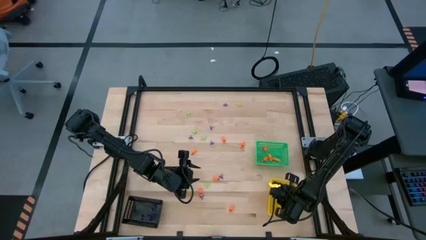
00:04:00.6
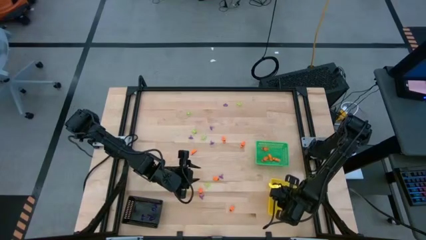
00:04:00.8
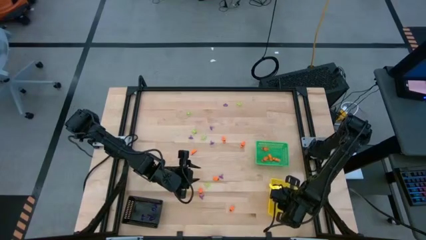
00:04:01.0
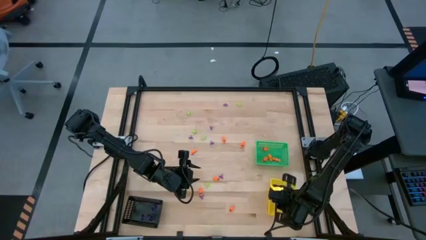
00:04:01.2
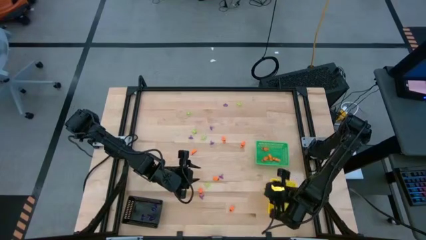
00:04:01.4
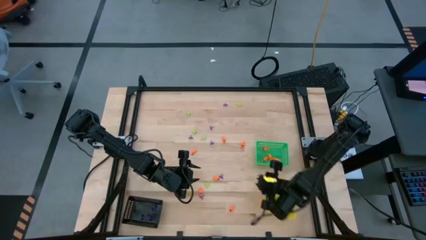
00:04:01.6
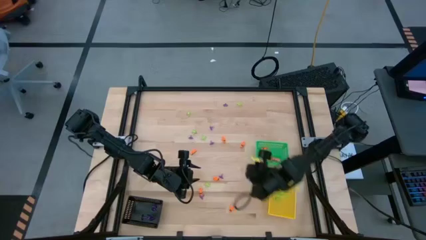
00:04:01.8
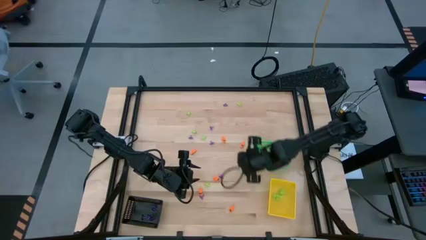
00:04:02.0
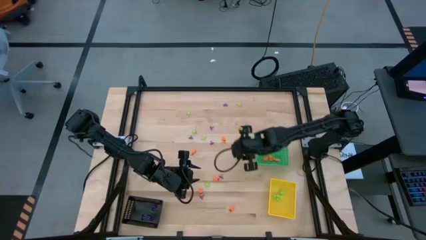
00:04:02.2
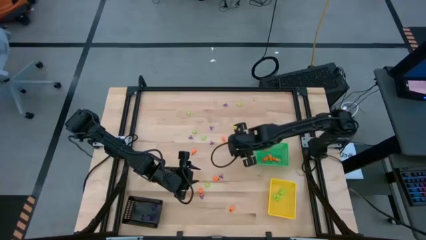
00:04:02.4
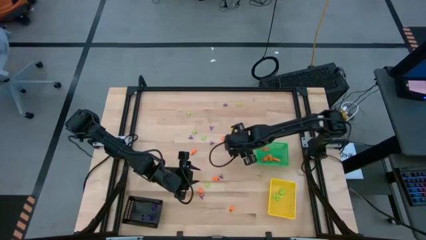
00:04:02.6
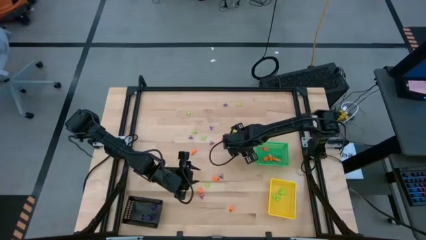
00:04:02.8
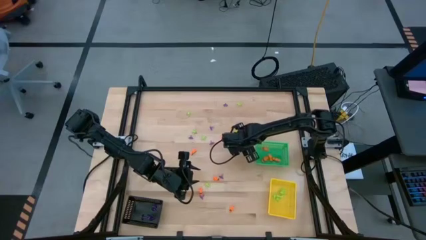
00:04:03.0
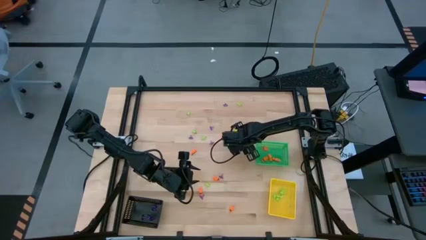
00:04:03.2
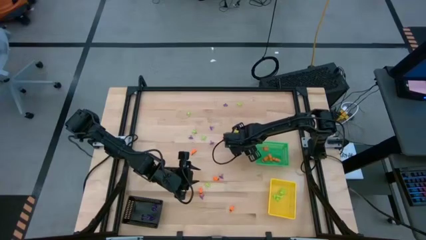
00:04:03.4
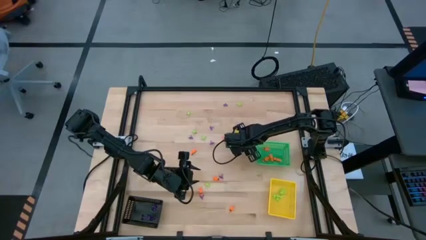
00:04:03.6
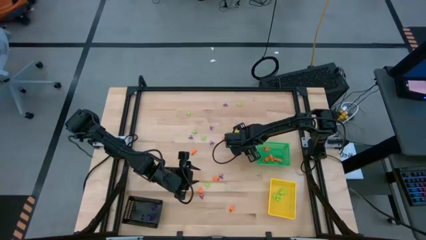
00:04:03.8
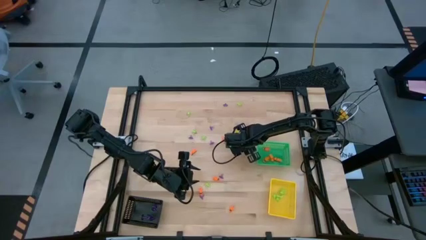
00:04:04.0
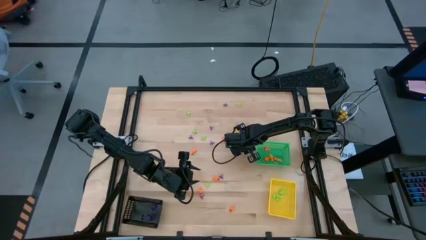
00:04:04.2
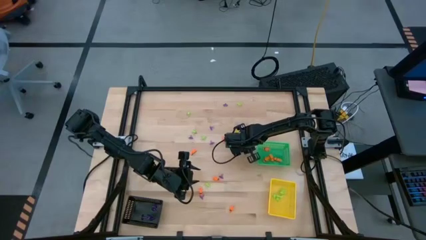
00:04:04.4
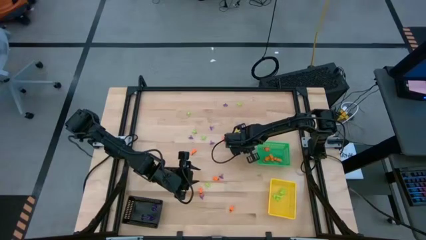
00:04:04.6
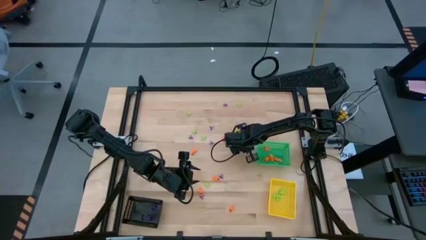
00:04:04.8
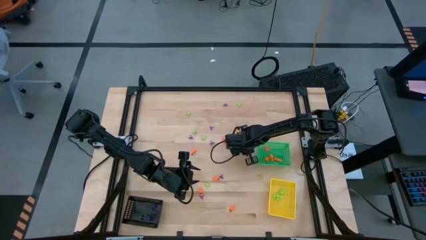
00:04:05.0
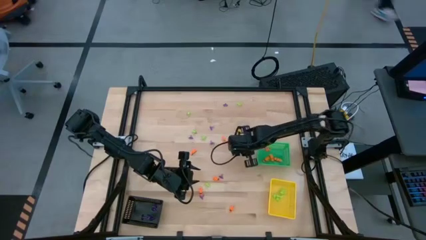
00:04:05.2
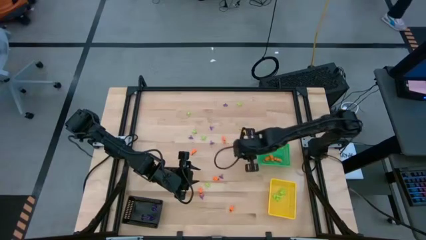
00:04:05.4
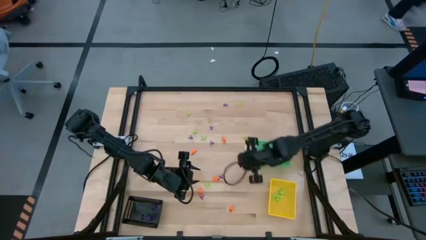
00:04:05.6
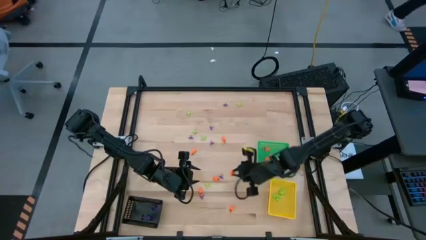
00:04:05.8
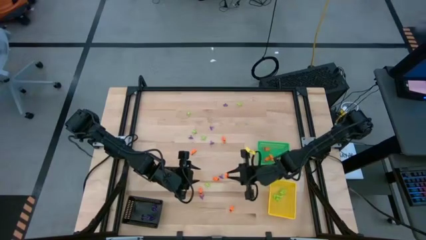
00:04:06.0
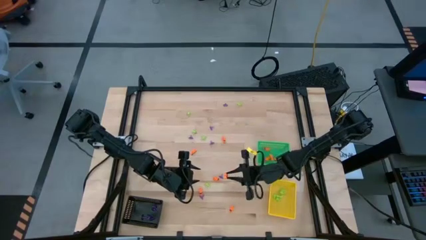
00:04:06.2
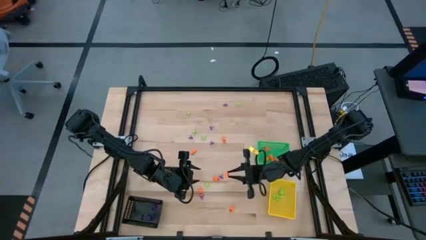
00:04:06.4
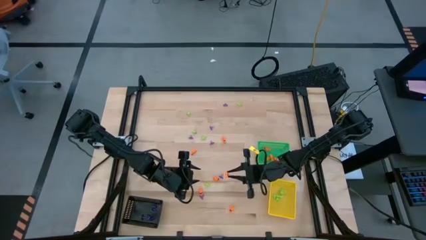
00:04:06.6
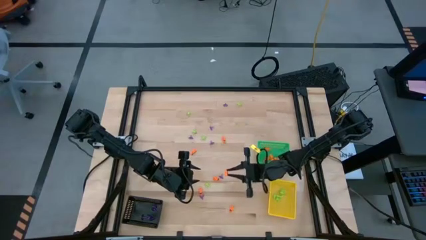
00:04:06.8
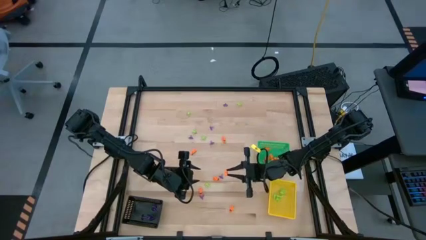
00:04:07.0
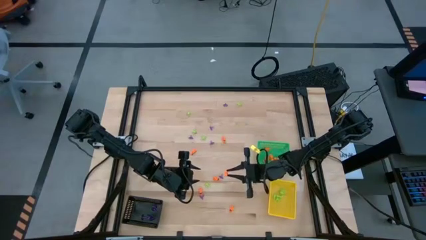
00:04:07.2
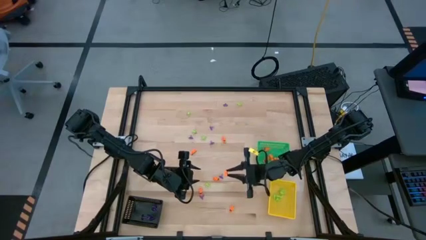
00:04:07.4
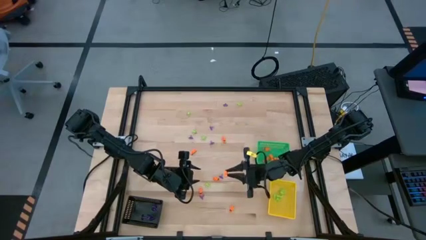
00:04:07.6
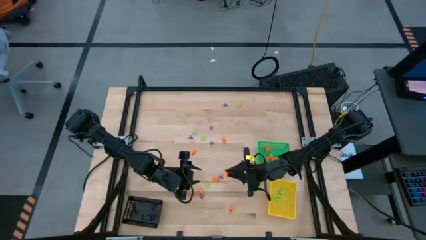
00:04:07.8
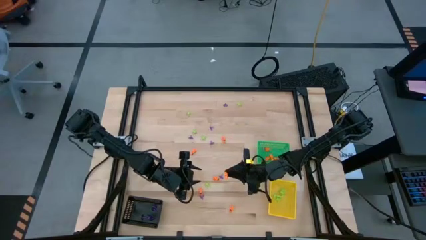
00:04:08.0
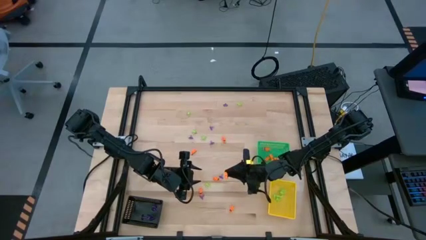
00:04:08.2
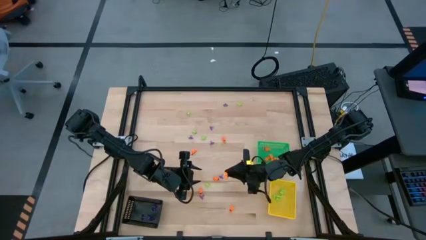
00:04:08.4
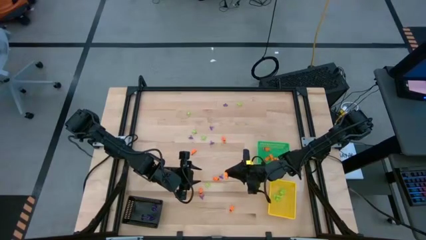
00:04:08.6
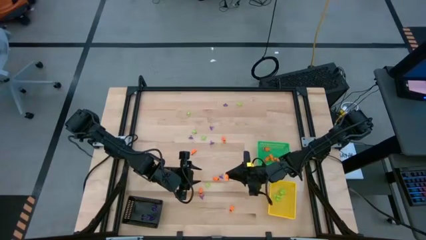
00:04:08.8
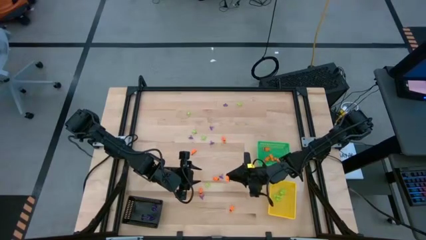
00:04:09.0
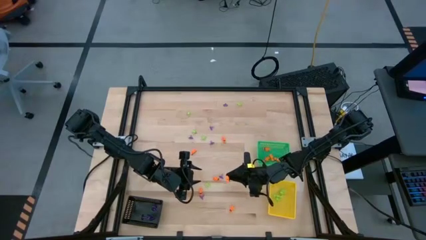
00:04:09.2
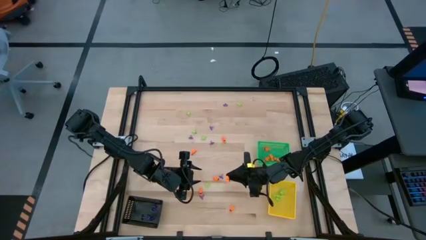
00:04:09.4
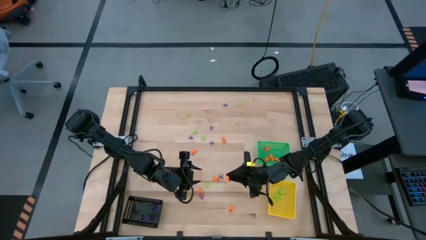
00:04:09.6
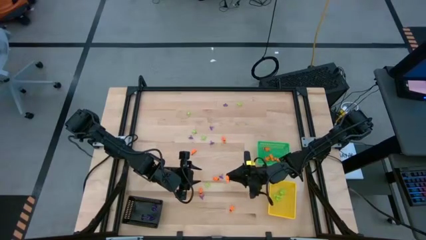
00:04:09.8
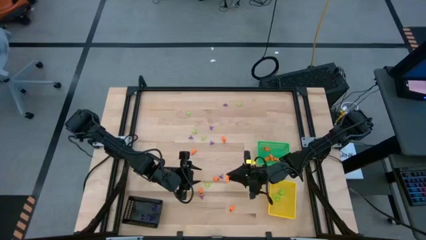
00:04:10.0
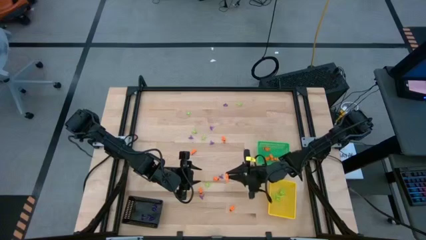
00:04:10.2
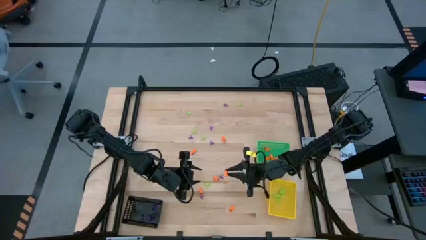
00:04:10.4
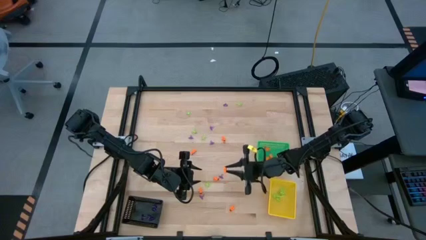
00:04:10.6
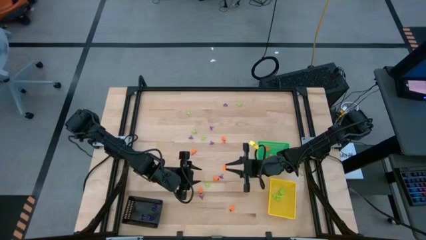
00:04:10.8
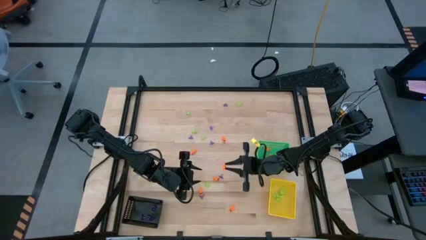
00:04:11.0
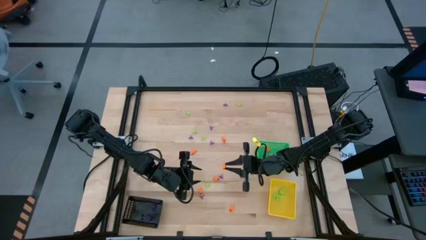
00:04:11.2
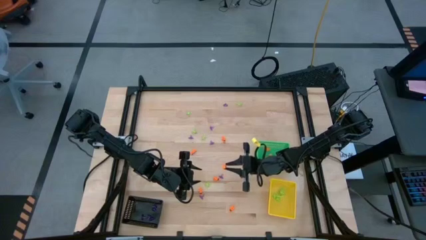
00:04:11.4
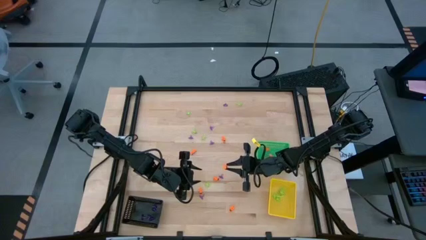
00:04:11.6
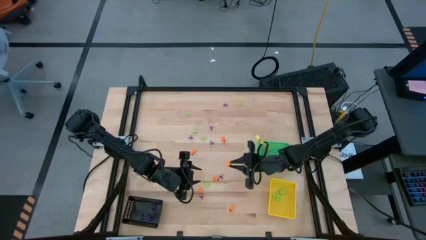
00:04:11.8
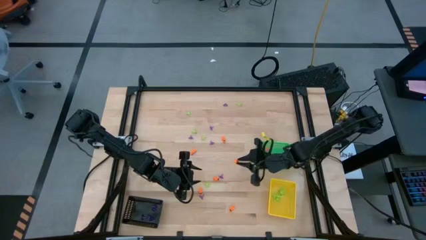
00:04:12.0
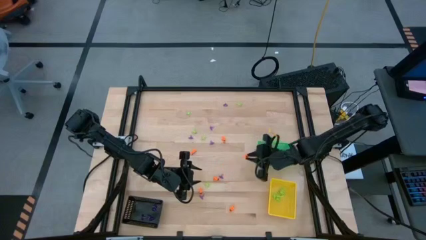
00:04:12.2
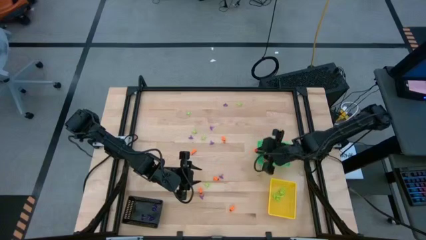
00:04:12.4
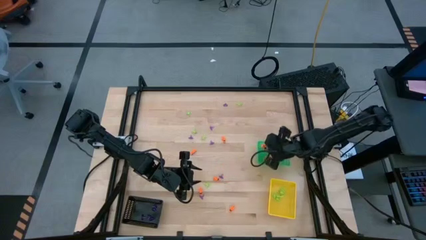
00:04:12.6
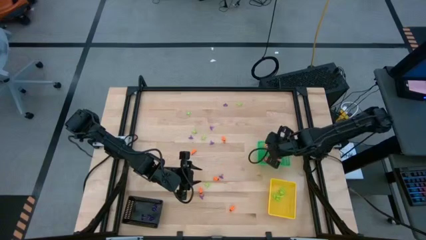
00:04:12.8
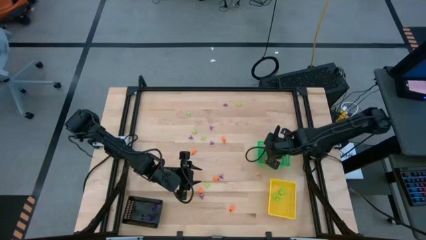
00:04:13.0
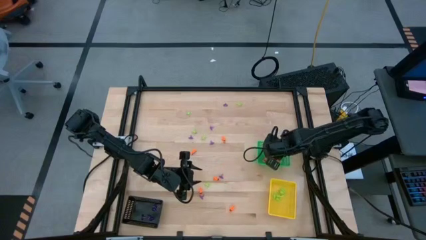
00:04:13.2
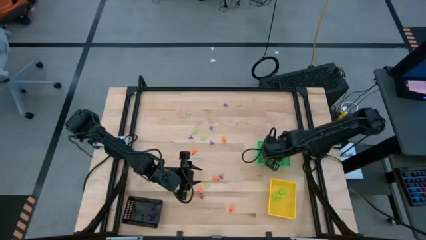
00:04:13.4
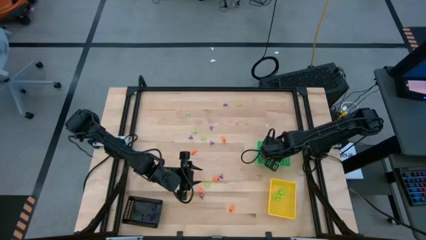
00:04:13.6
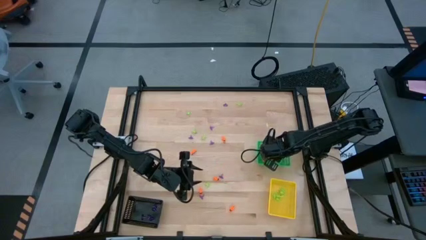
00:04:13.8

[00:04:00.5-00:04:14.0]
Task: Sort Halloween decoration
Put the orange skeleton toy into the green bin
